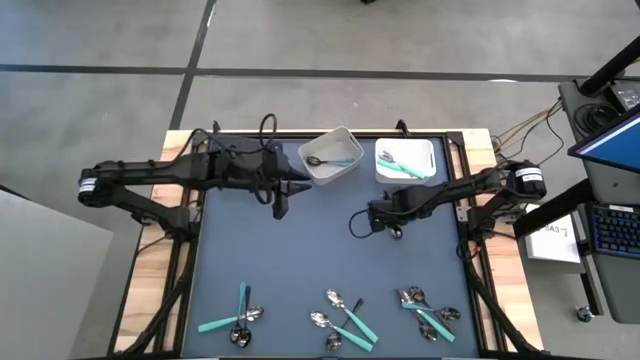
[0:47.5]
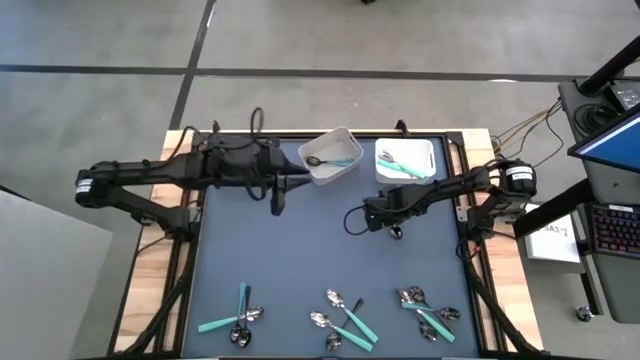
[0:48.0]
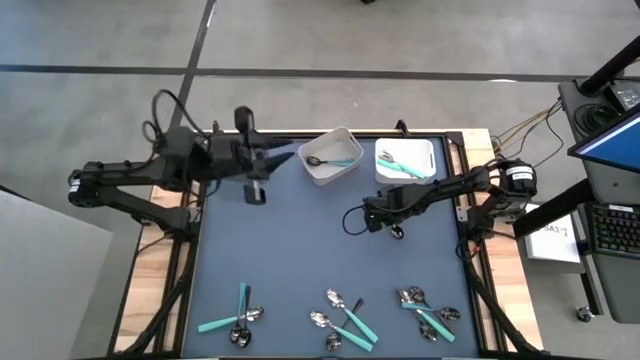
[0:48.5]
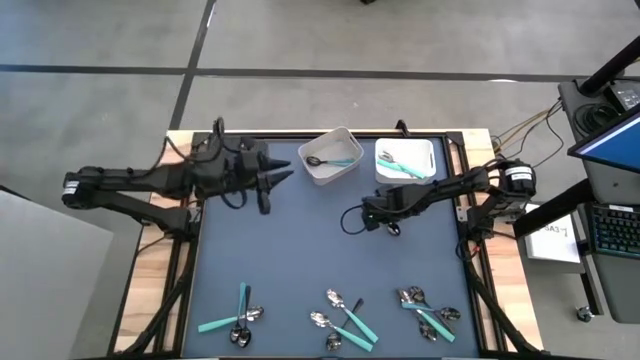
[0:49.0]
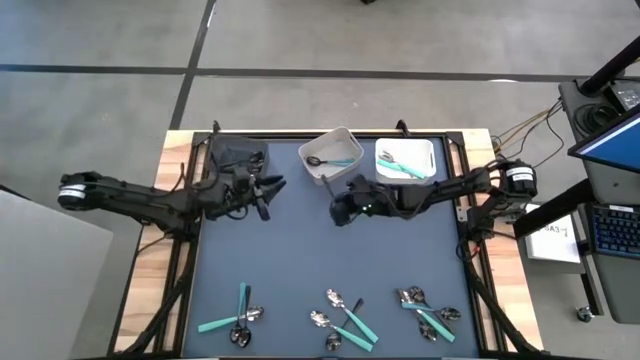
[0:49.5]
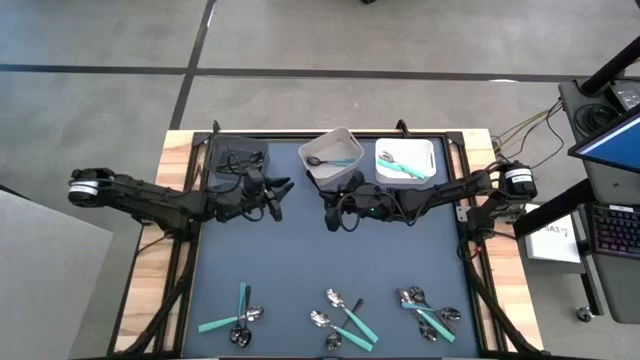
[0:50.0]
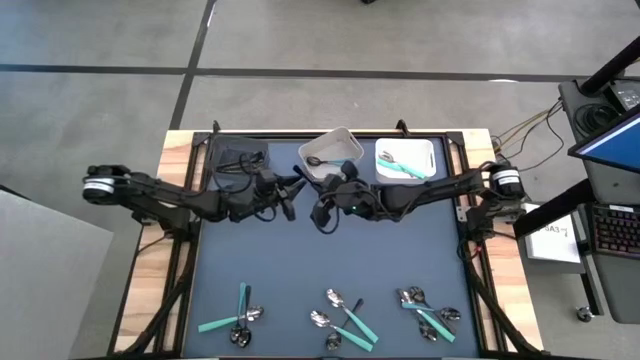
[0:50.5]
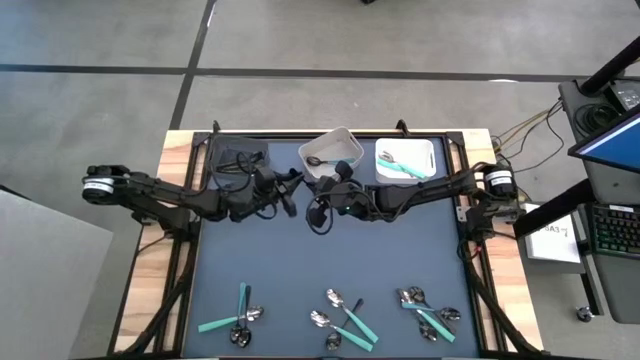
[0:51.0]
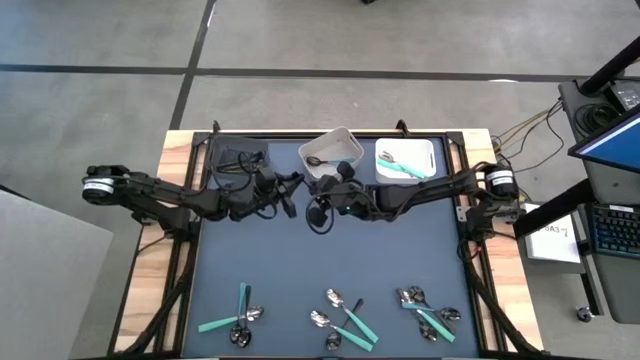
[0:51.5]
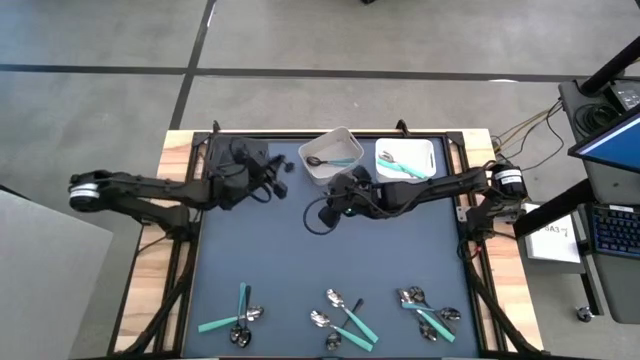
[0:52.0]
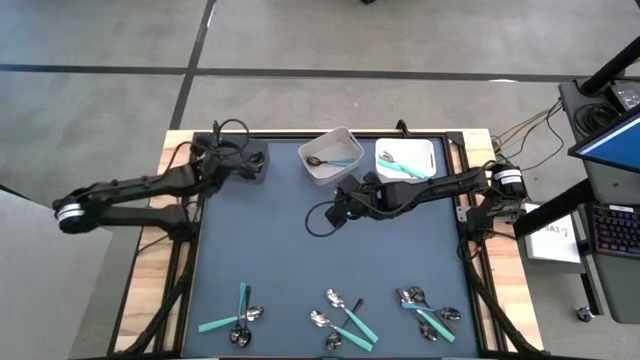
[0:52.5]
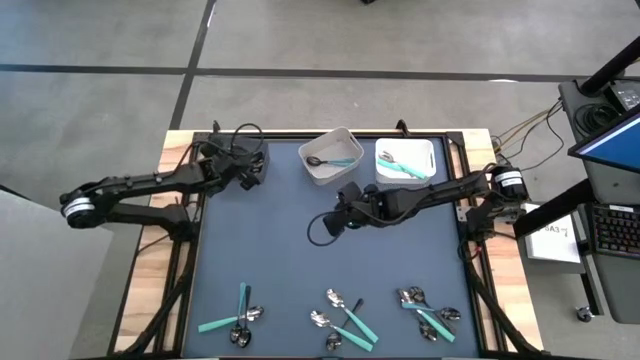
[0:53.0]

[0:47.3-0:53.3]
Task: Sort silverware by color (type)
Put the black spoon into the black bin

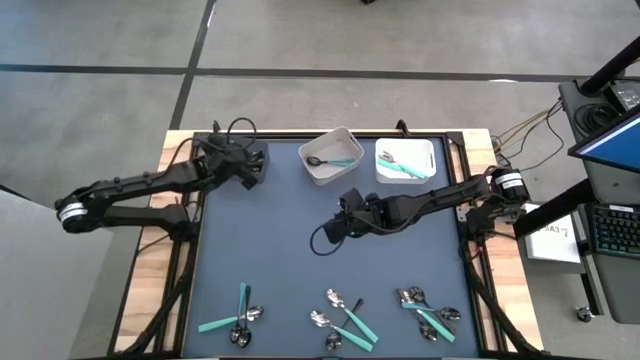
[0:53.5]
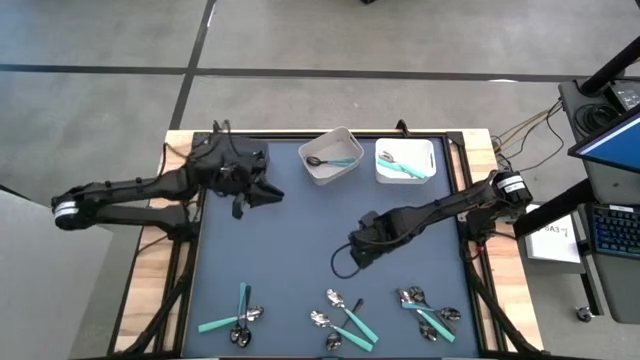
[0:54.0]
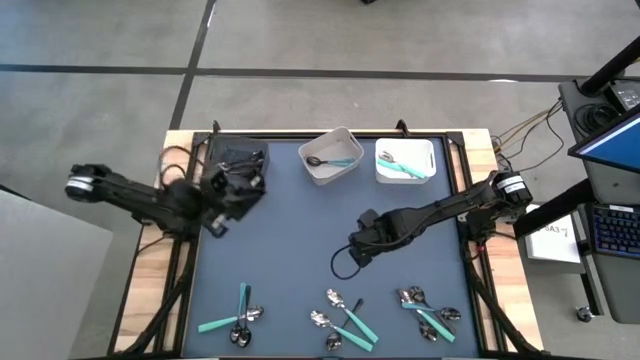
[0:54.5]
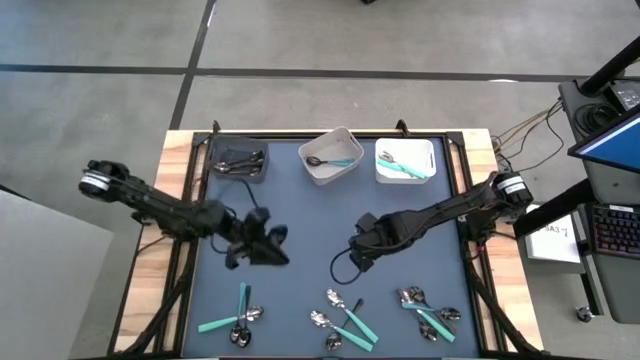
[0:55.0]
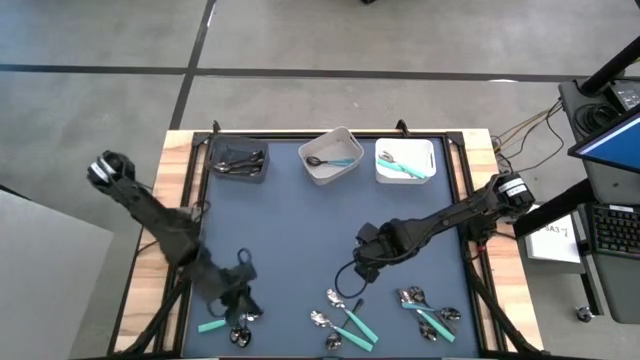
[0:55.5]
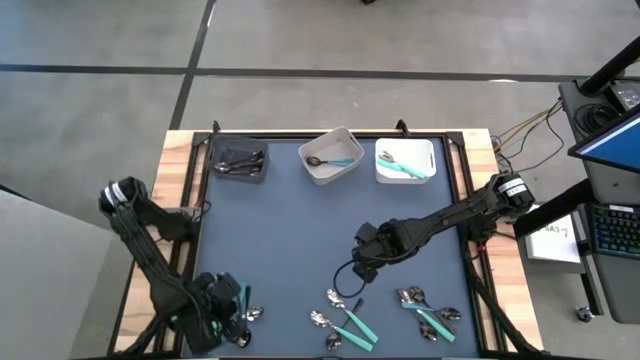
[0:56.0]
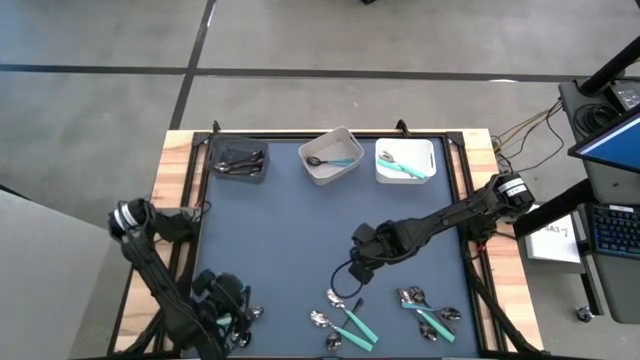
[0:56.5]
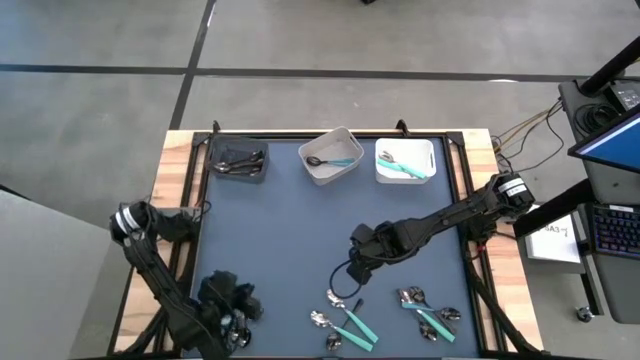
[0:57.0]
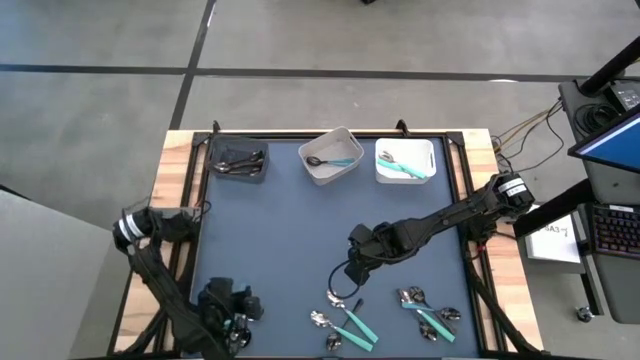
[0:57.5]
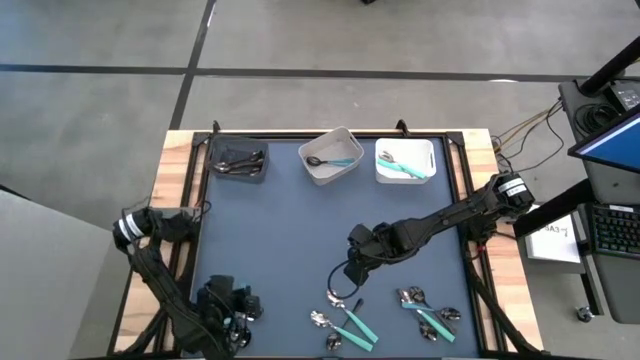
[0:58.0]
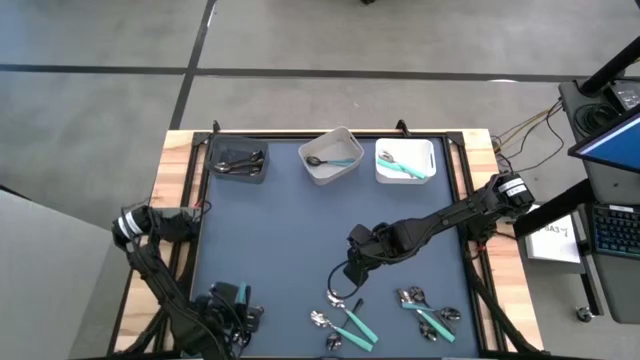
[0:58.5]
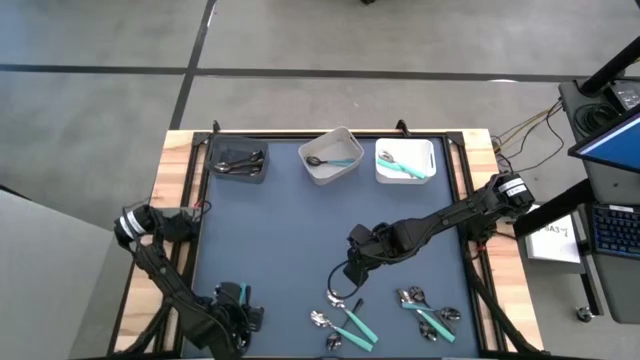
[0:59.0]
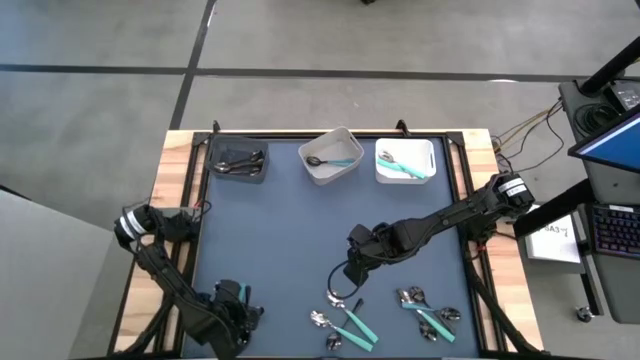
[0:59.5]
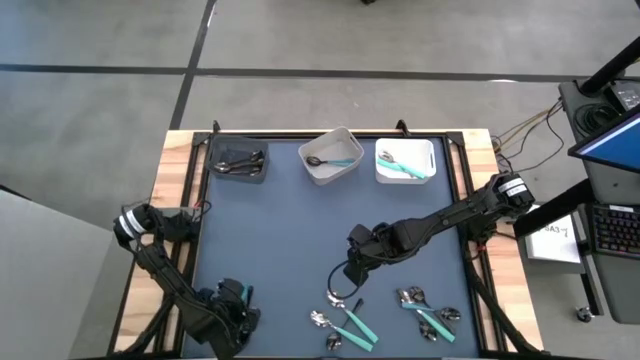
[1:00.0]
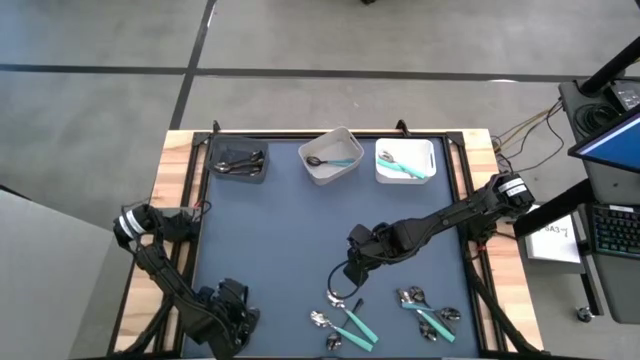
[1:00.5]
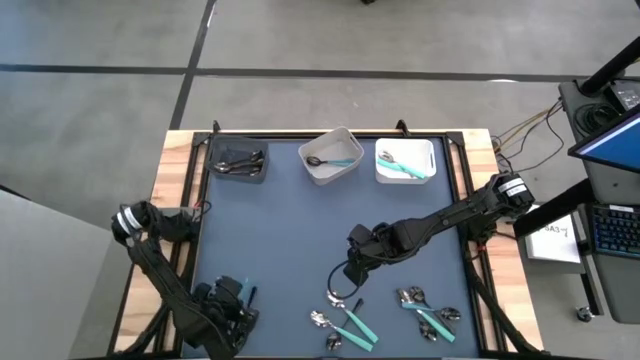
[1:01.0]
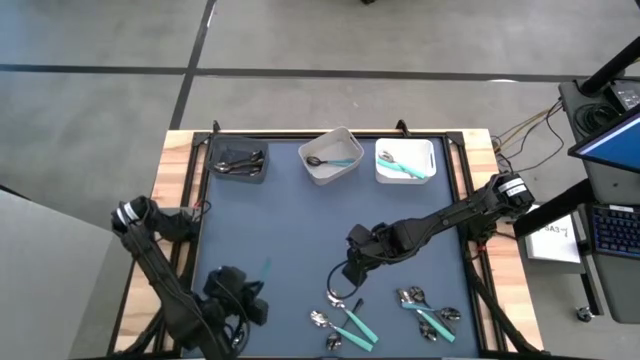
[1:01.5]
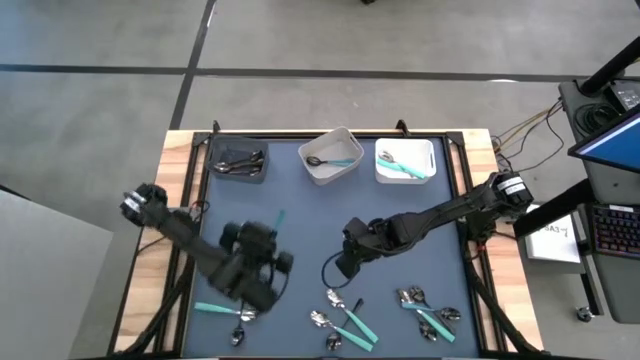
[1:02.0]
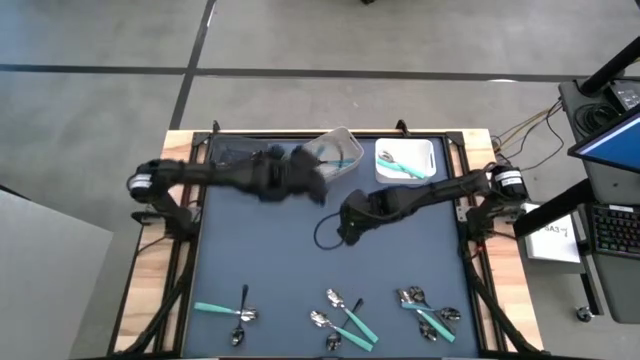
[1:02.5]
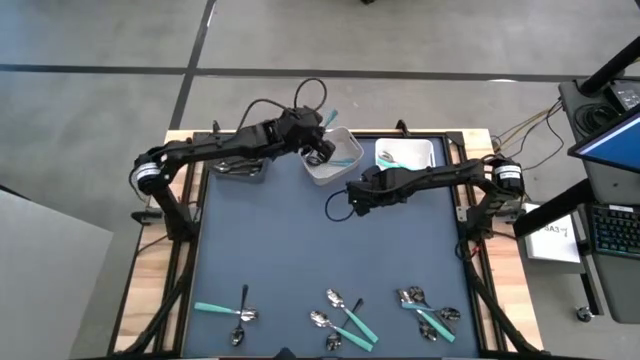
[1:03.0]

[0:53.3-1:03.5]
Put the blue spoon into the gray bin

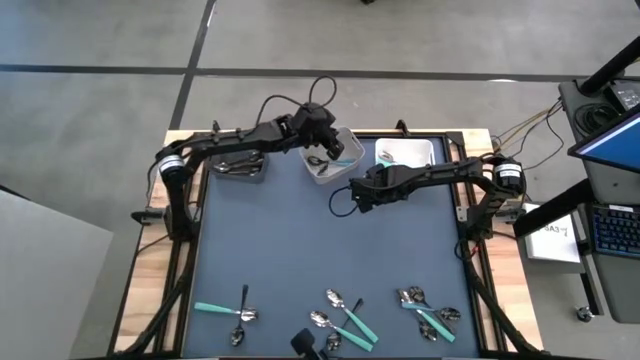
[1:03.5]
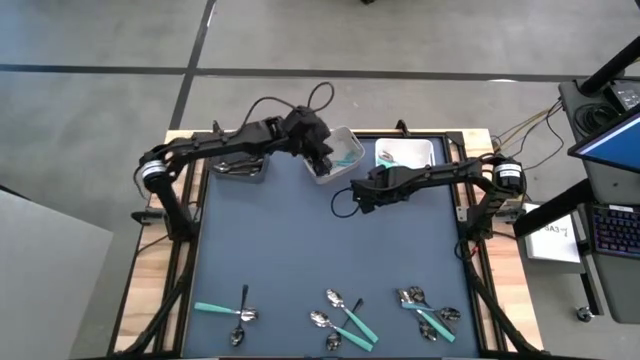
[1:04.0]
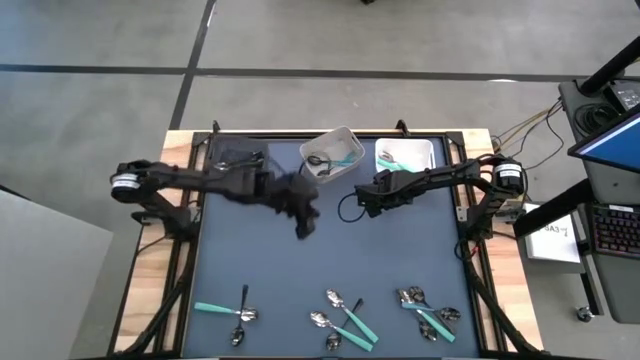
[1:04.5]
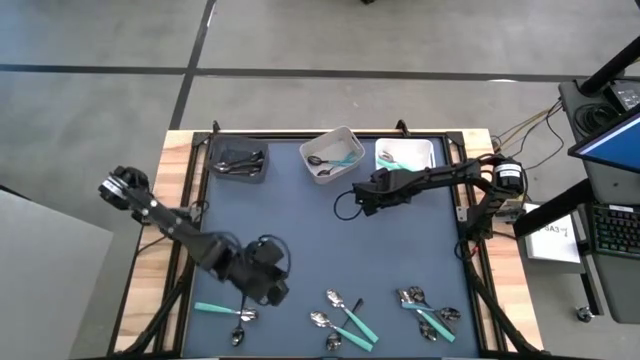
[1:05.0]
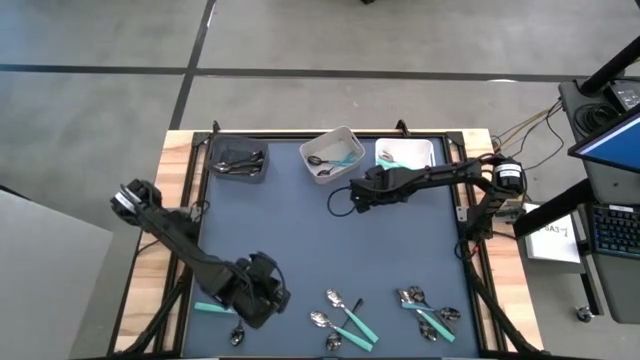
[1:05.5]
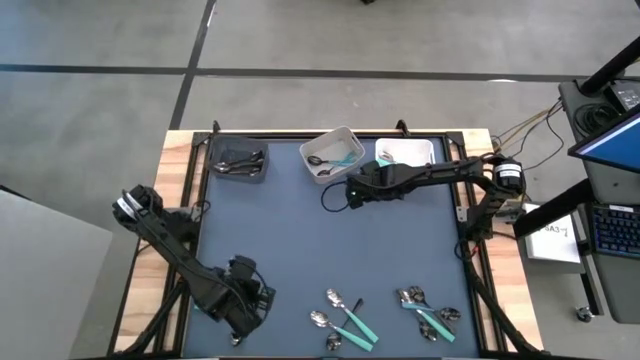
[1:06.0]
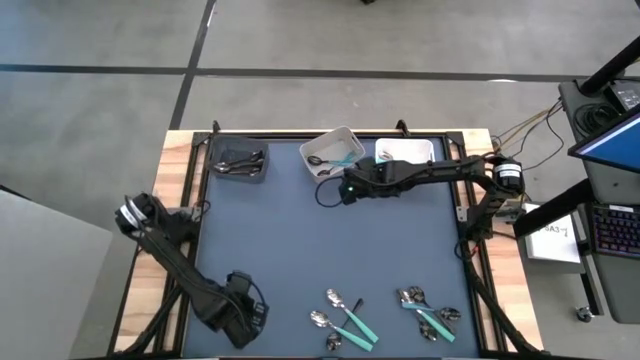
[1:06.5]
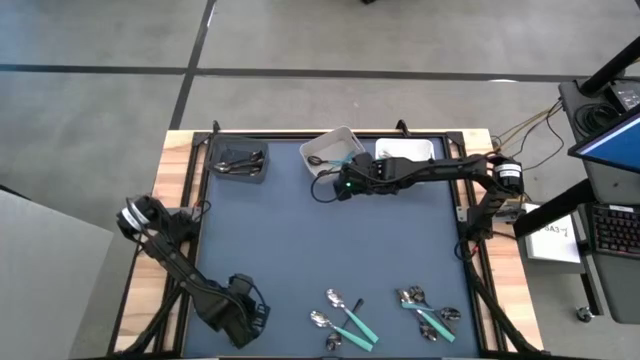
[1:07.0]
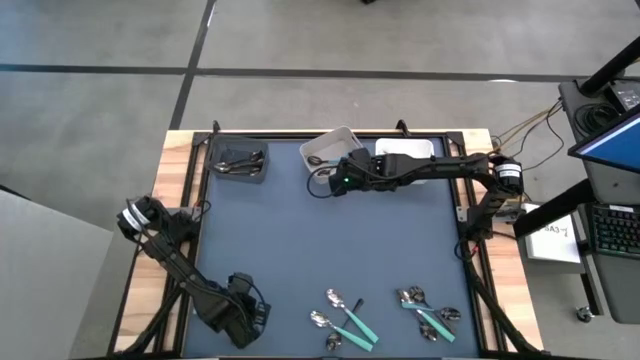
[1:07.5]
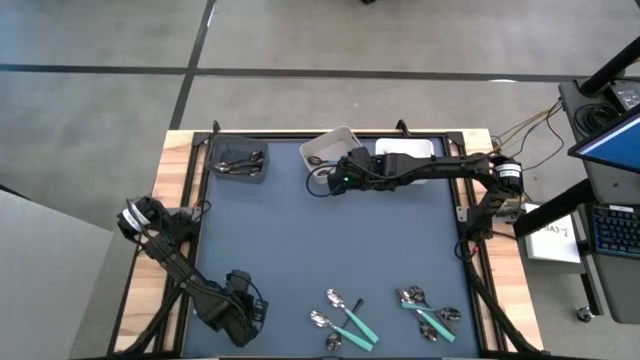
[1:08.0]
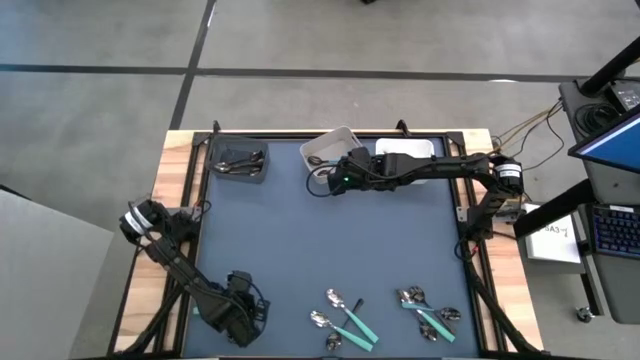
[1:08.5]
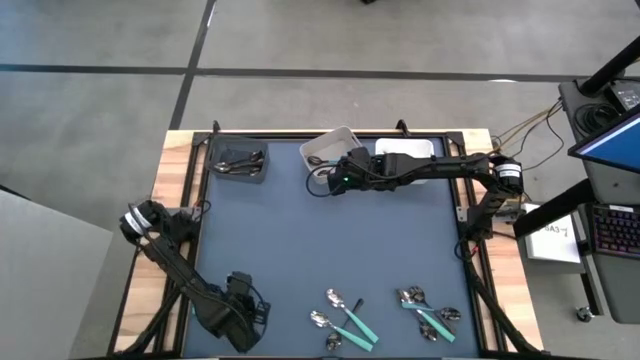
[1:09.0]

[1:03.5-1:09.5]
Put the black spoon into the black bin
